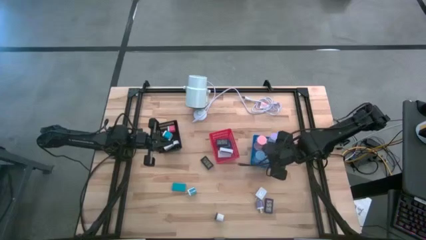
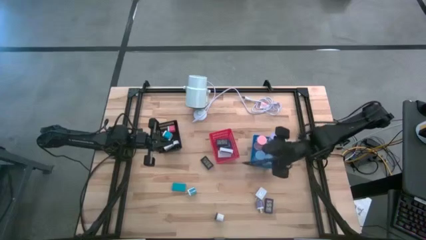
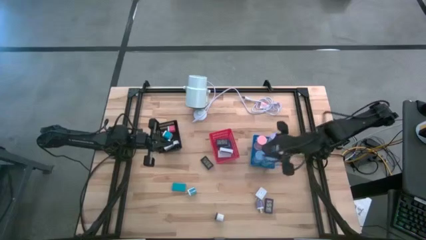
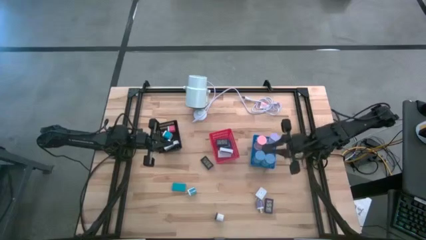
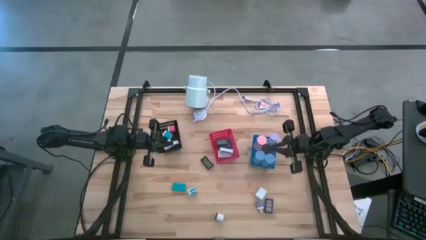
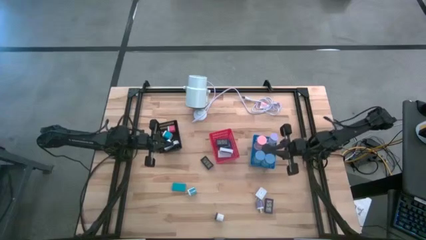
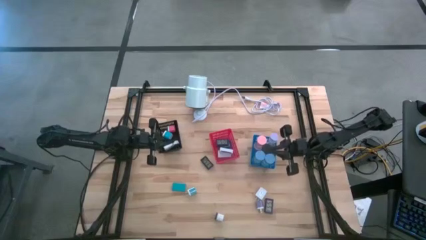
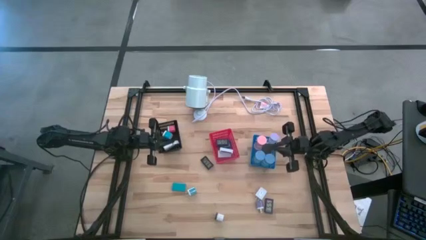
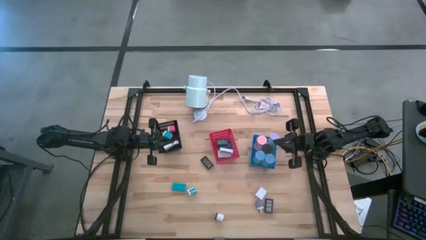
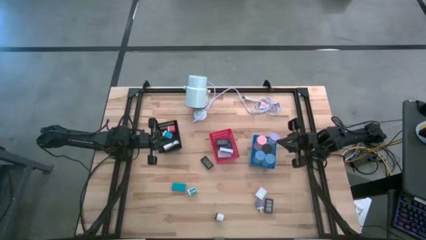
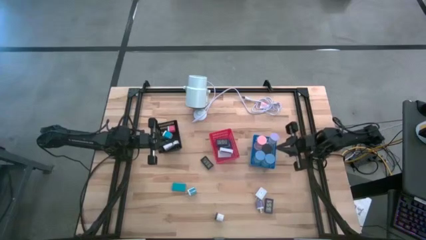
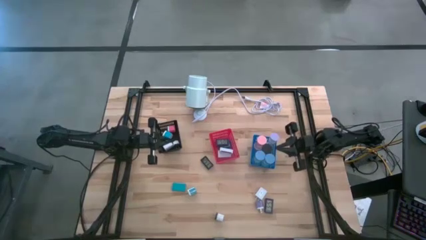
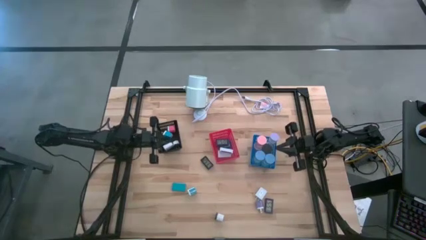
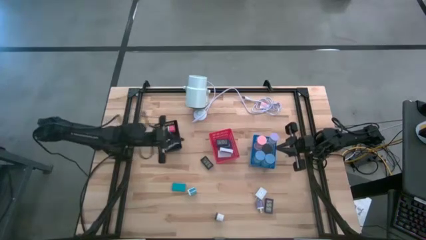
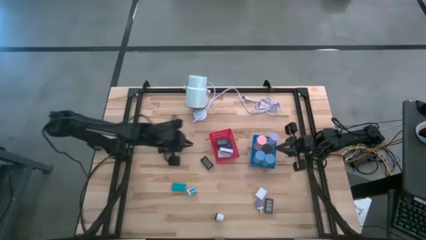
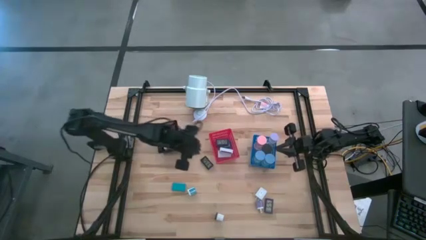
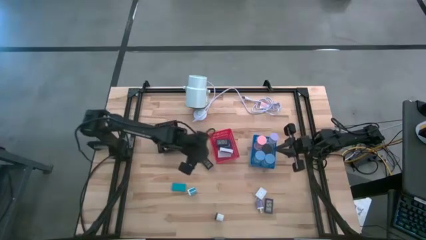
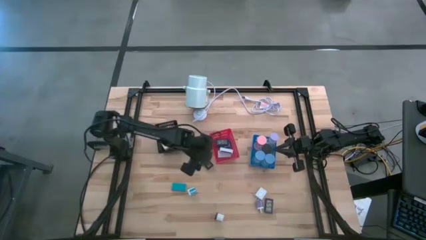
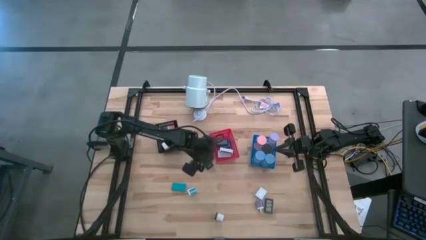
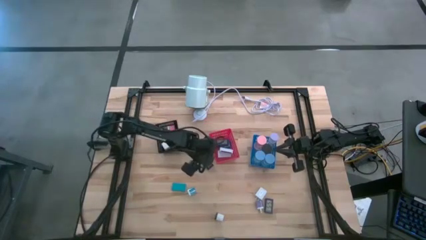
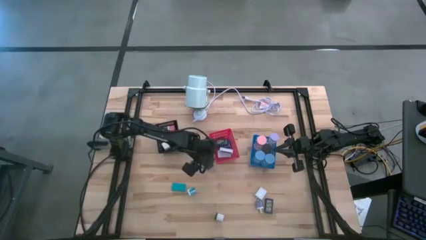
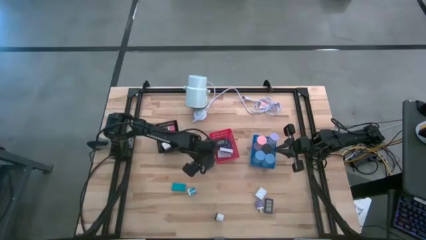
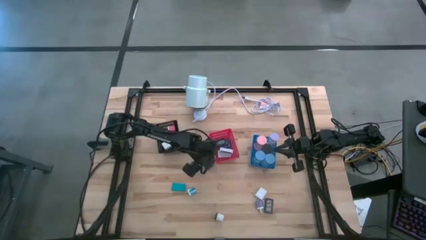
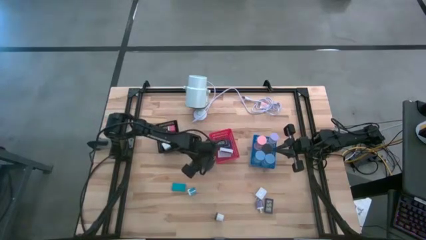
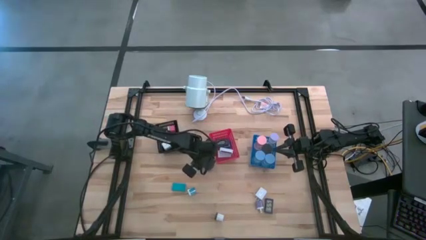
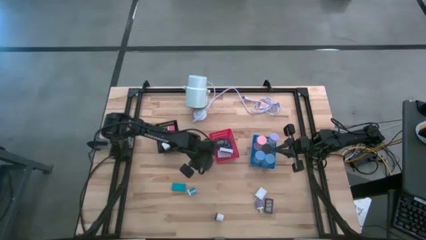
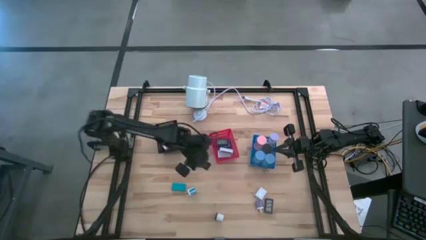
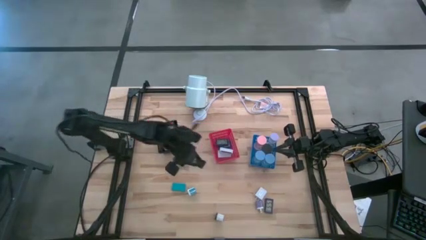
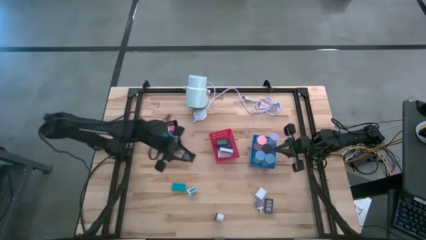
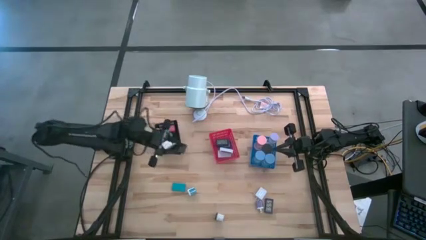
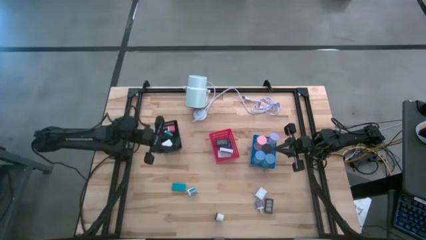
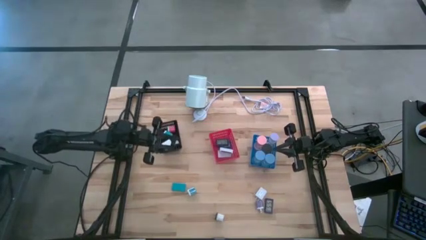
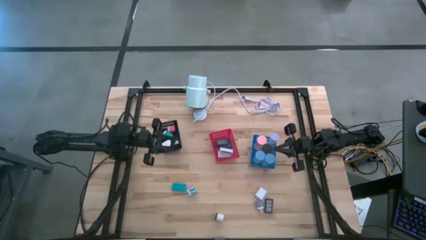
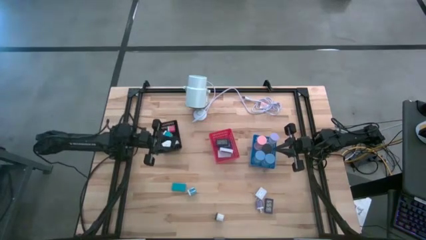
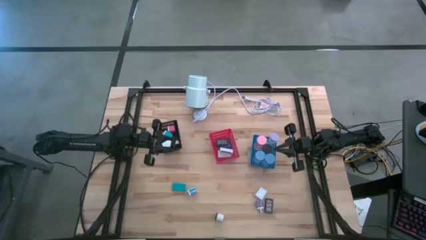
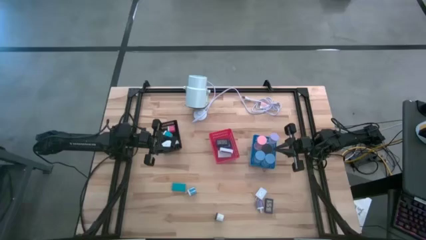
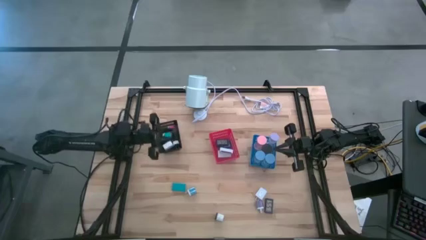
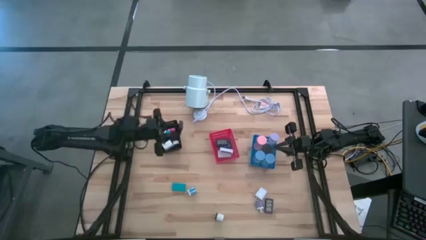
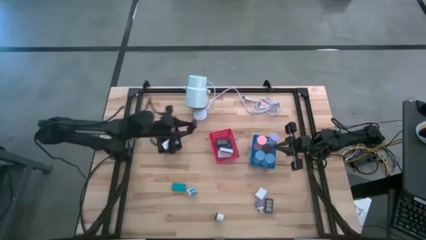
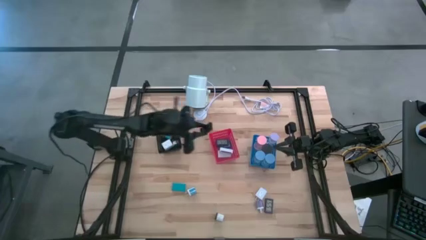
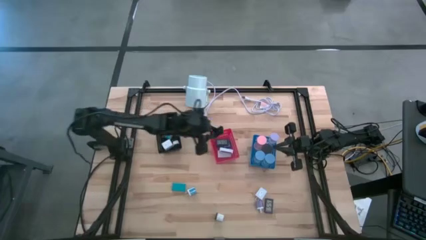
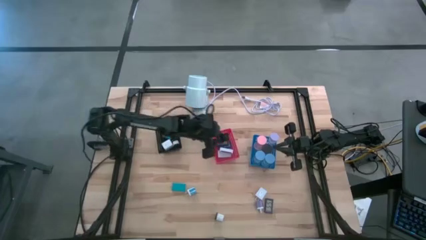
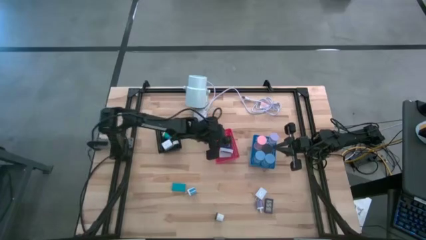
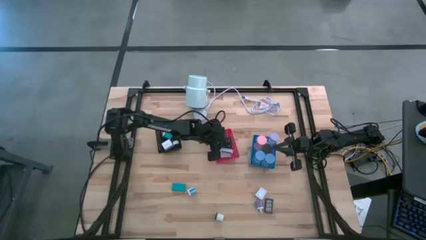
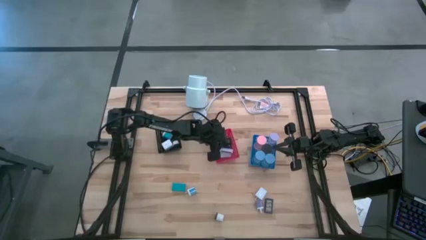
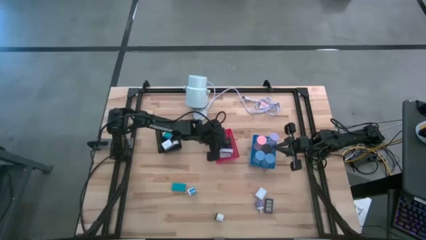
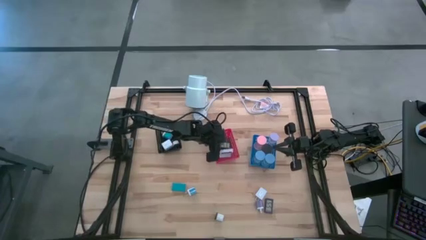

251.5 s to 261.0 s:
Task: Pick & Place Office items
Put the black digital clock into the red bin

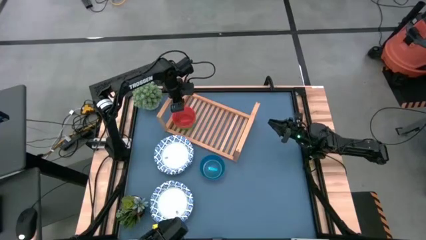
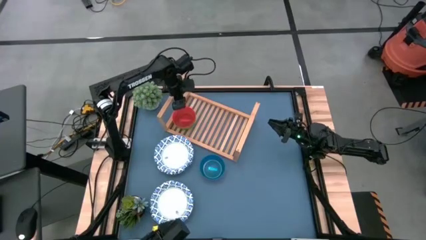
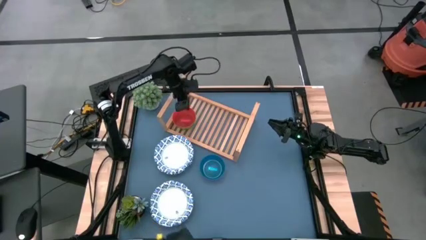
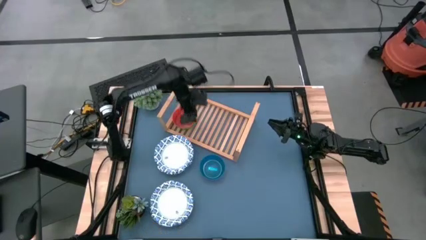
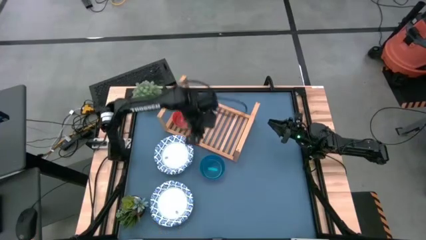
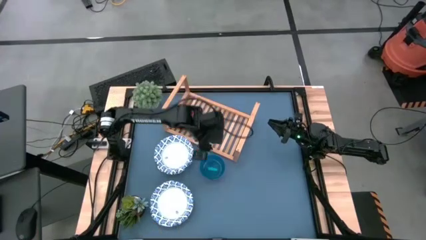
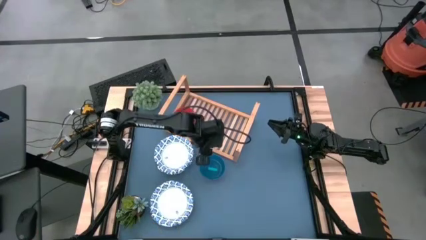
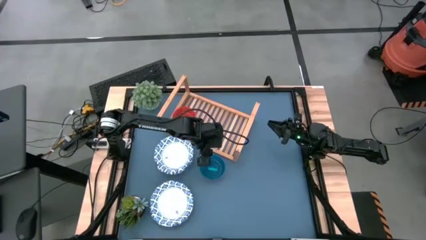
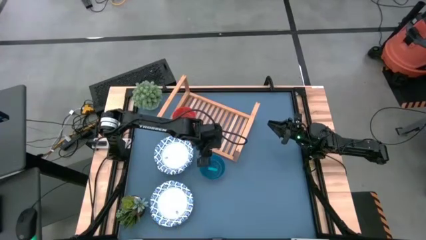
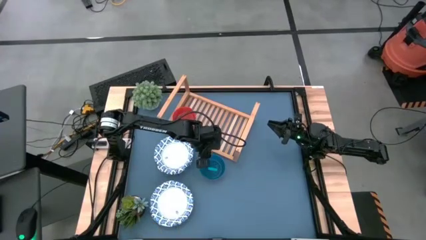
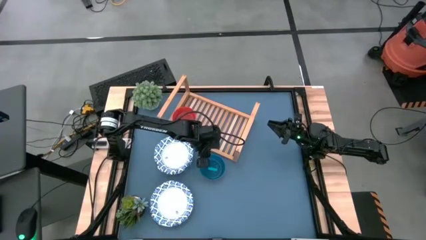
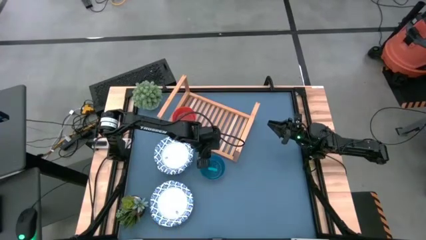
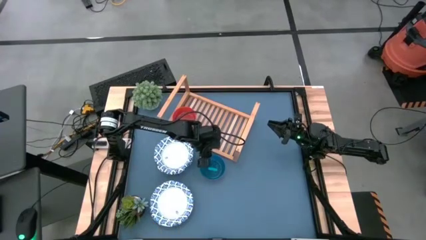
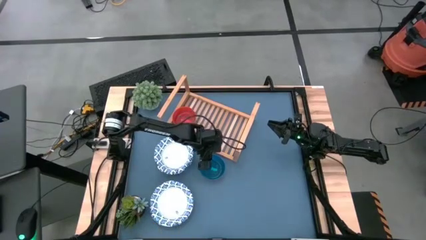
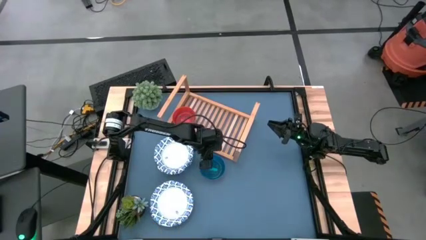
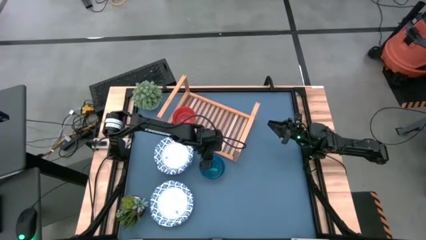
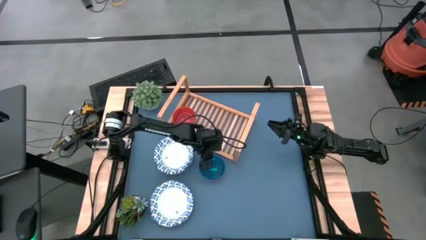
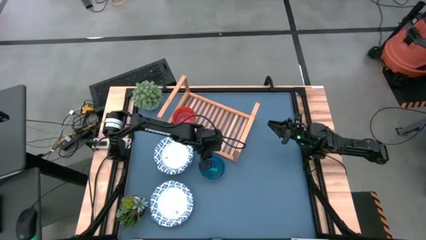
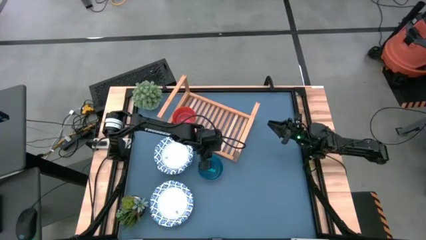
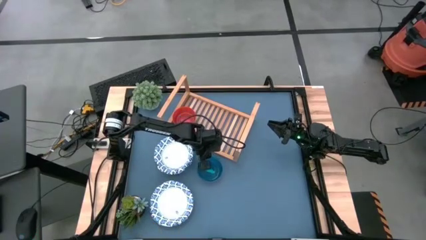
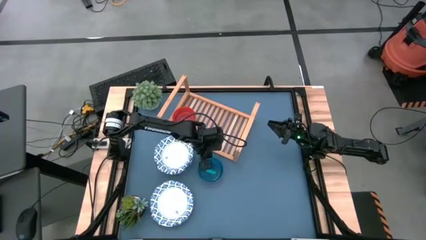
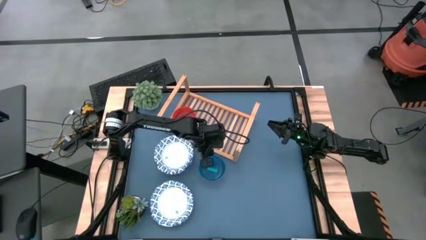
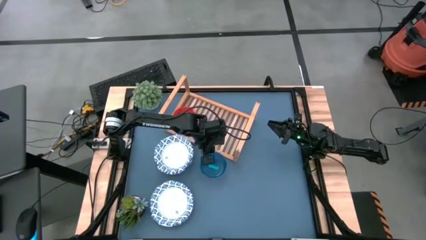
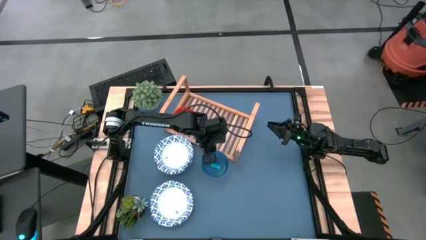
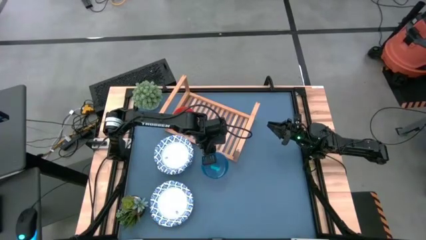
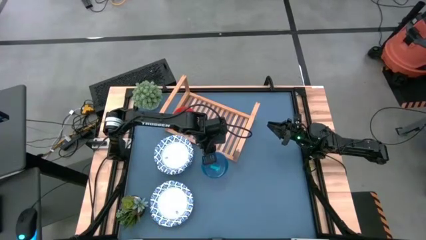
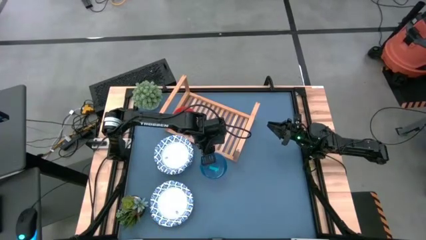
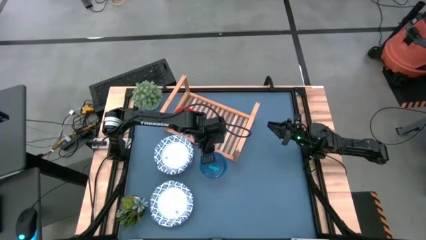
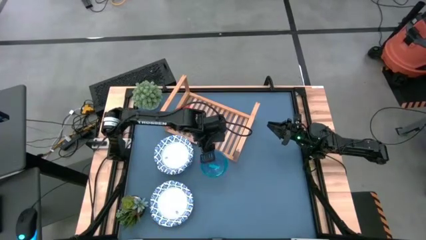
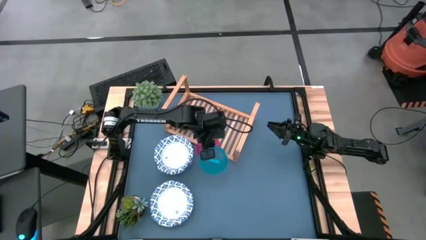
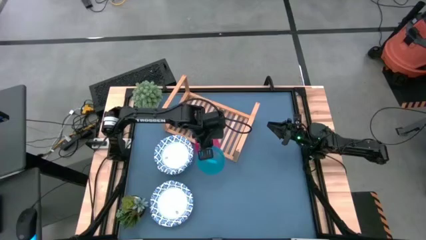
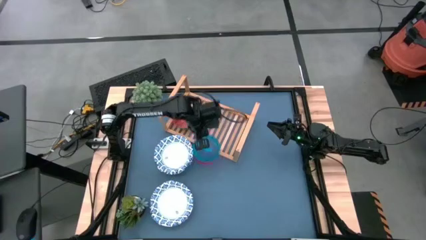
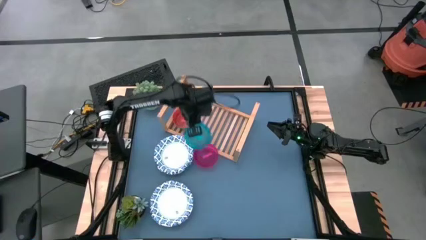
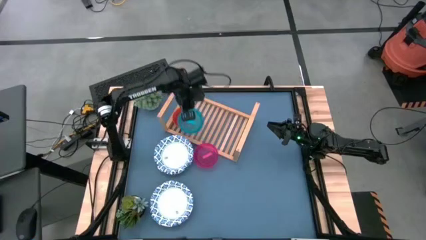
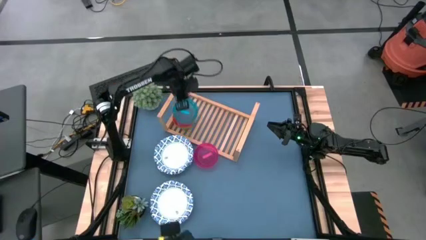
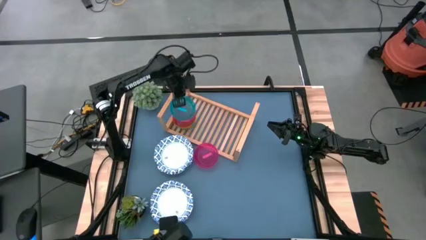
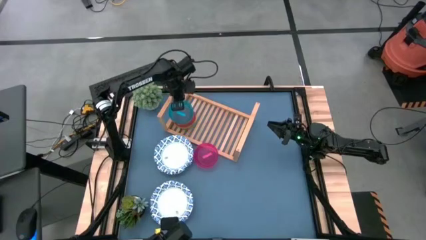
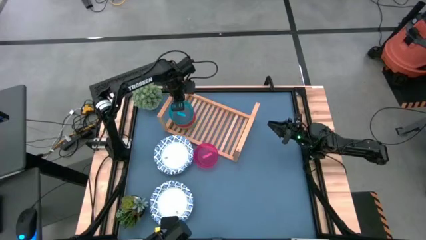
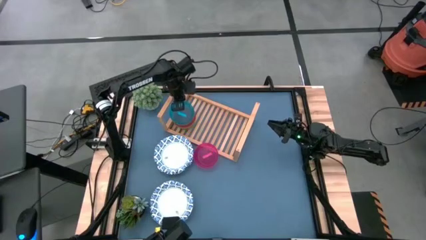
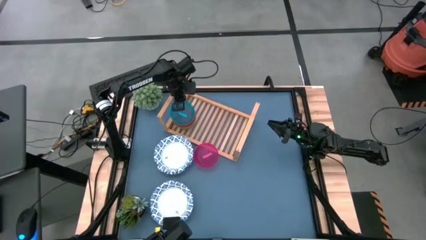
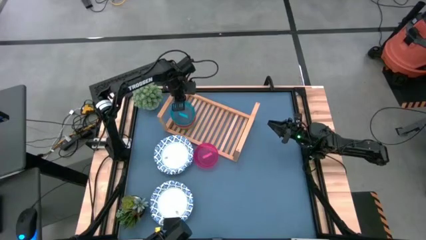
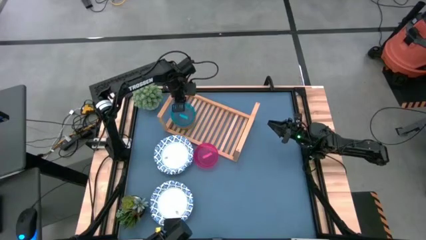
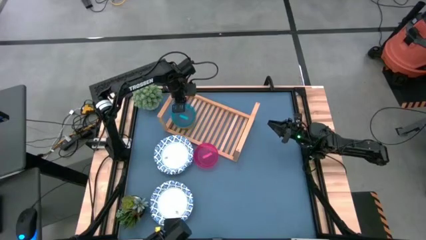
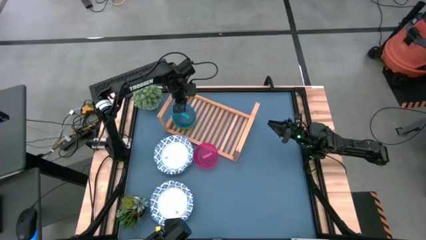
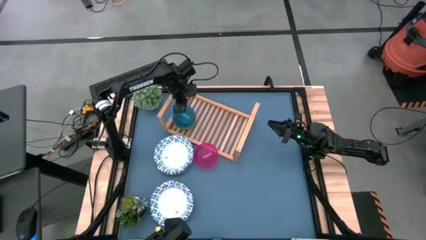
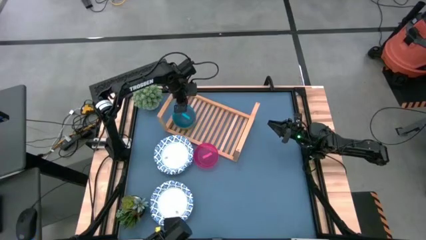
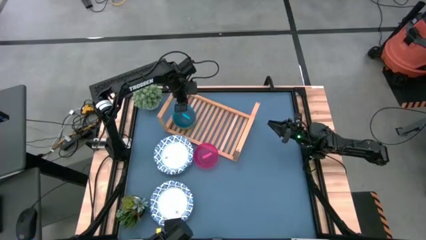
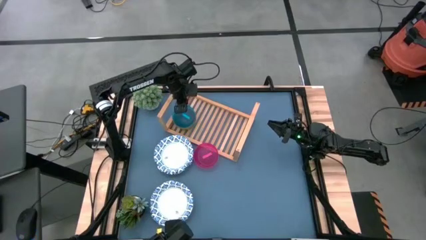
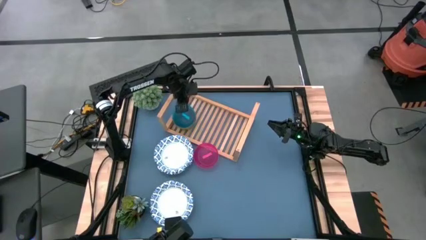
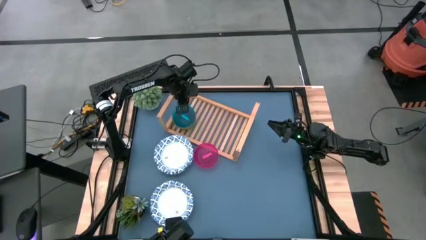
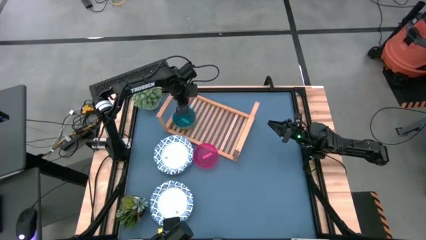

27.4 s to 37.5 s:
Task: Place and stack bowls onto a shelf
Stack the small blue bowl on top of the small orange bowl on the shelf
